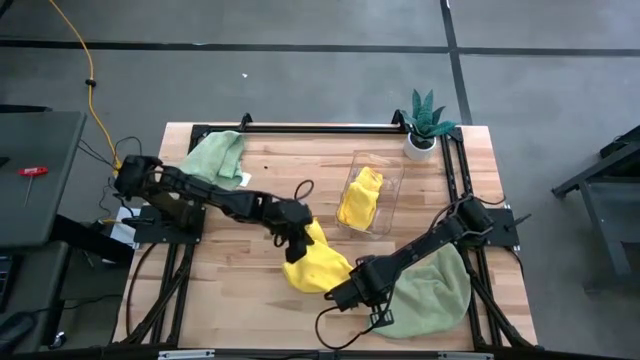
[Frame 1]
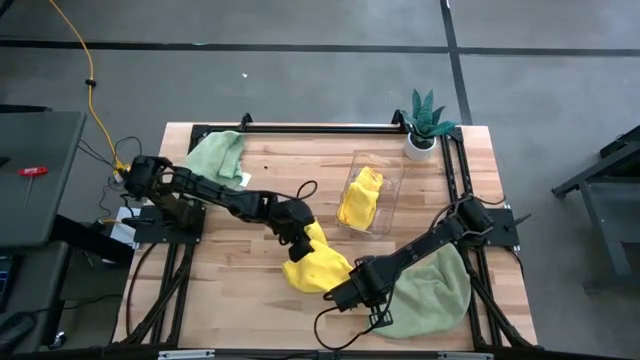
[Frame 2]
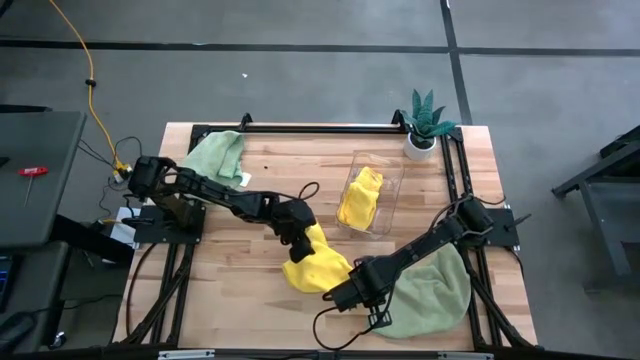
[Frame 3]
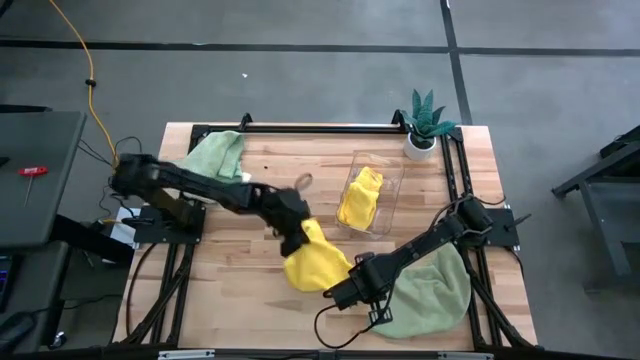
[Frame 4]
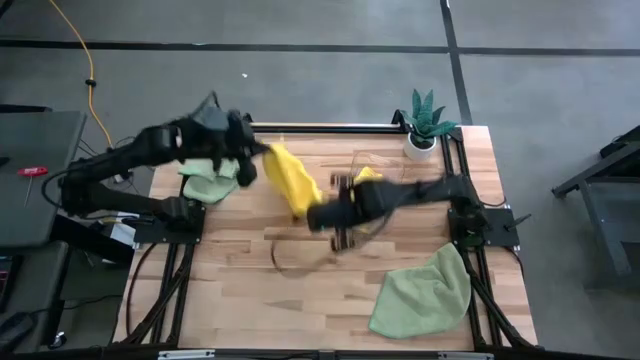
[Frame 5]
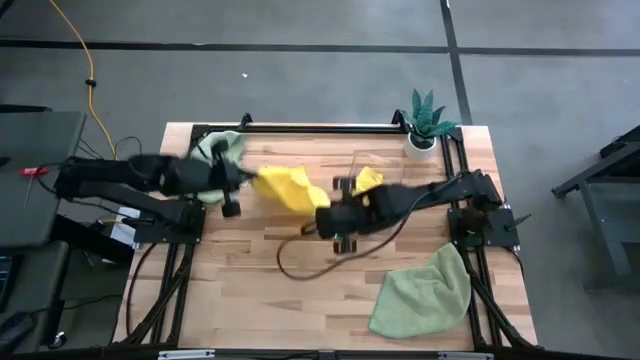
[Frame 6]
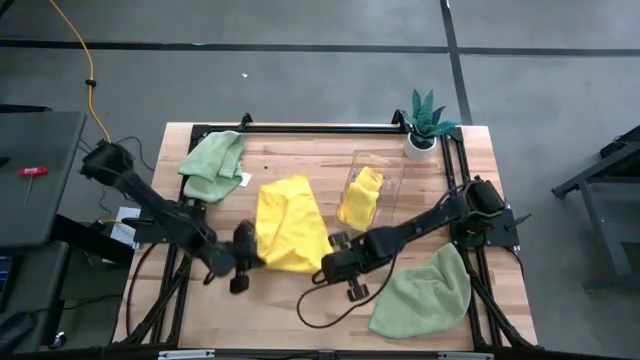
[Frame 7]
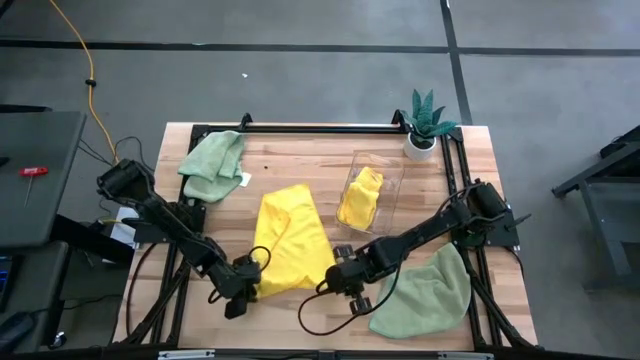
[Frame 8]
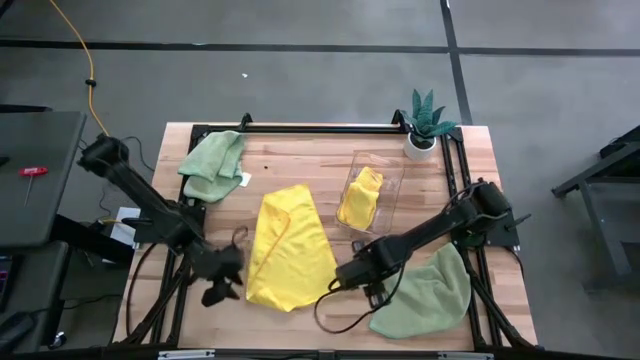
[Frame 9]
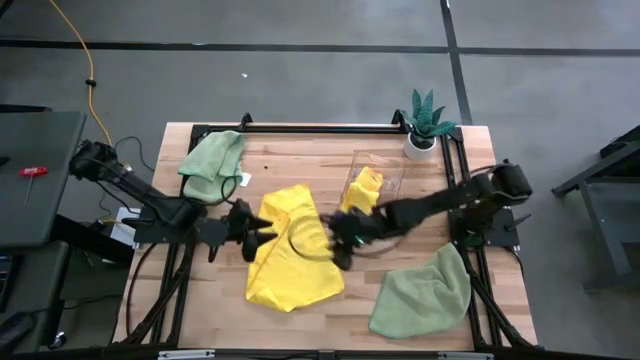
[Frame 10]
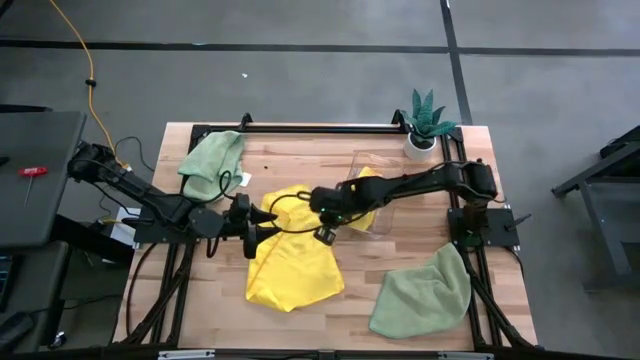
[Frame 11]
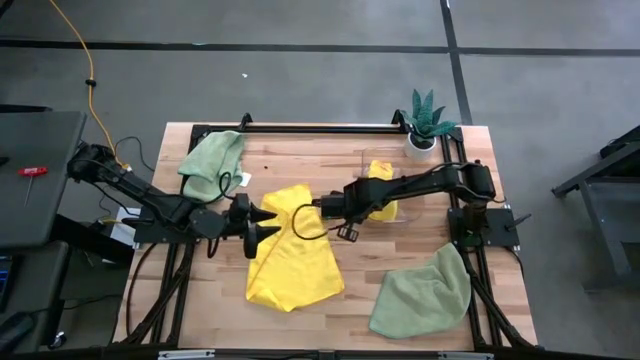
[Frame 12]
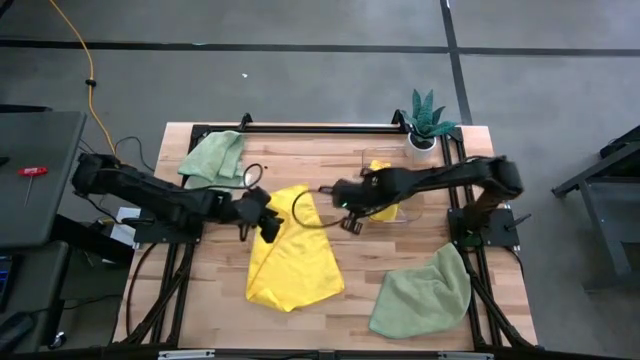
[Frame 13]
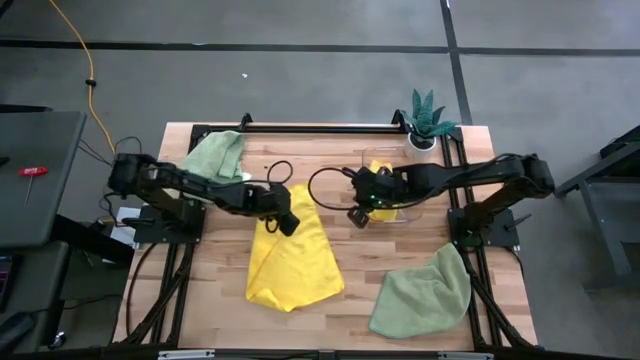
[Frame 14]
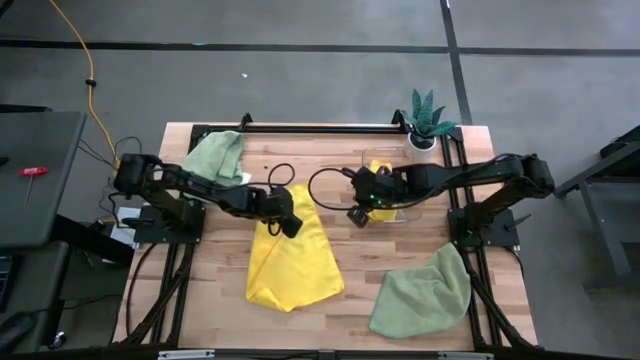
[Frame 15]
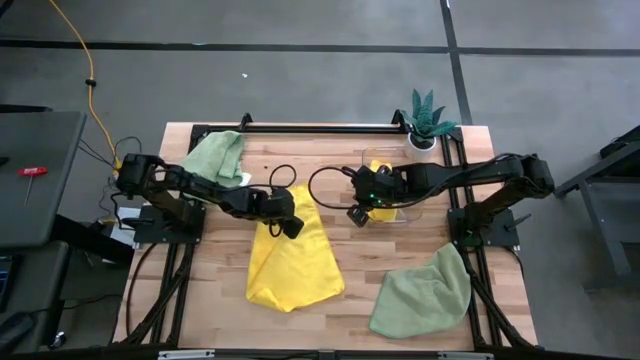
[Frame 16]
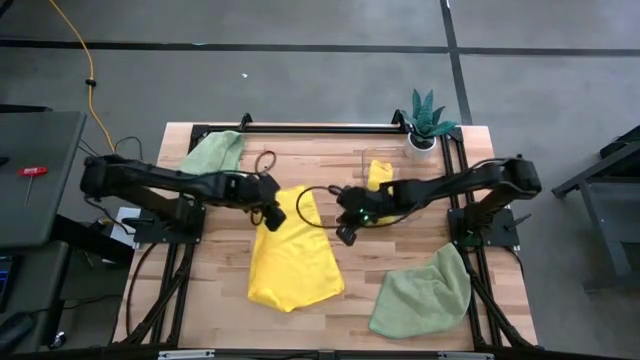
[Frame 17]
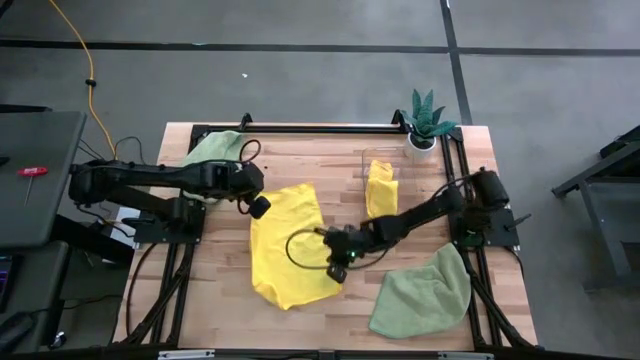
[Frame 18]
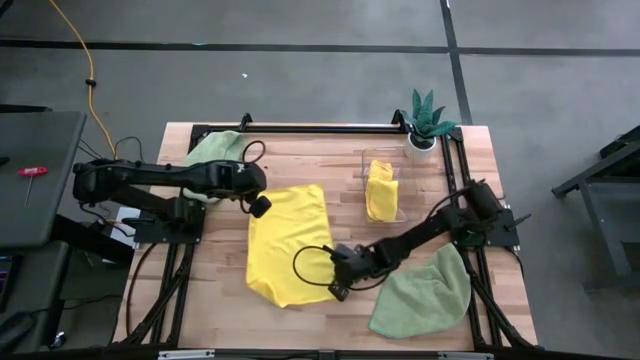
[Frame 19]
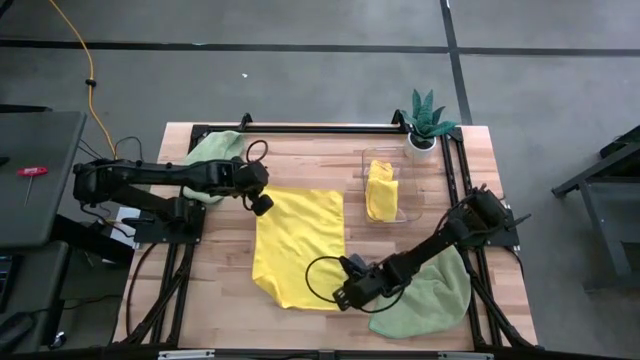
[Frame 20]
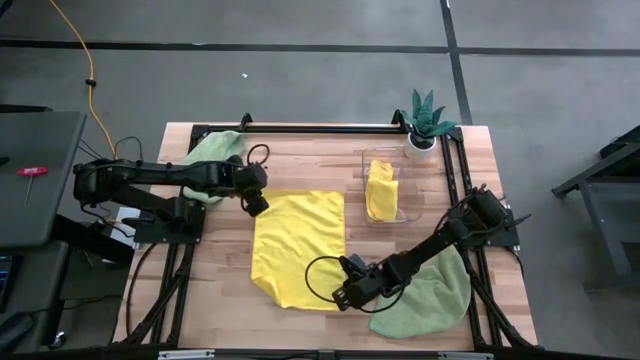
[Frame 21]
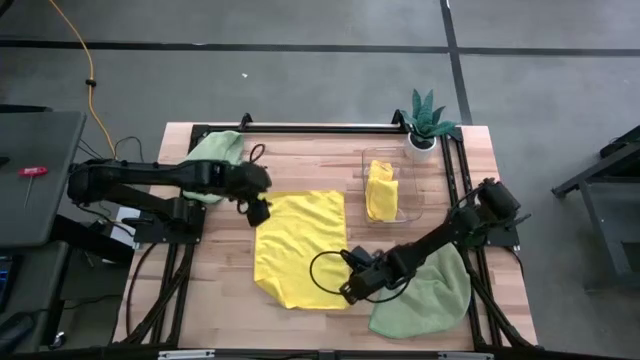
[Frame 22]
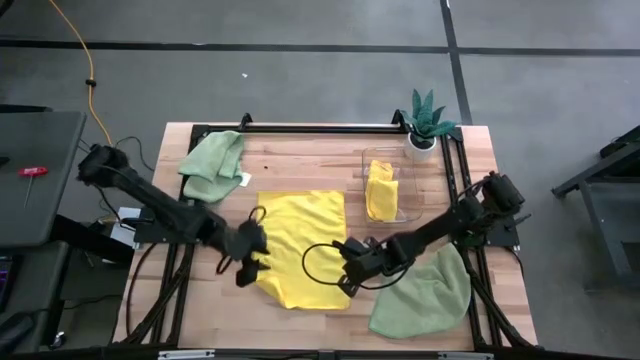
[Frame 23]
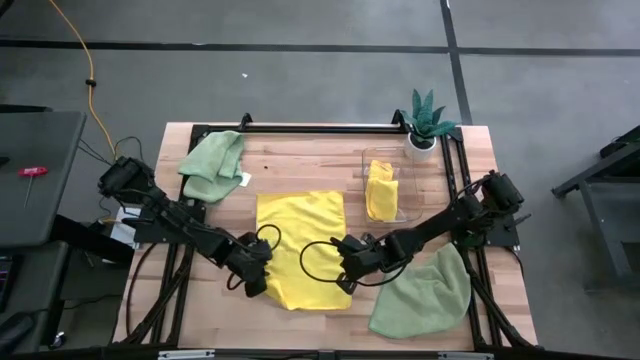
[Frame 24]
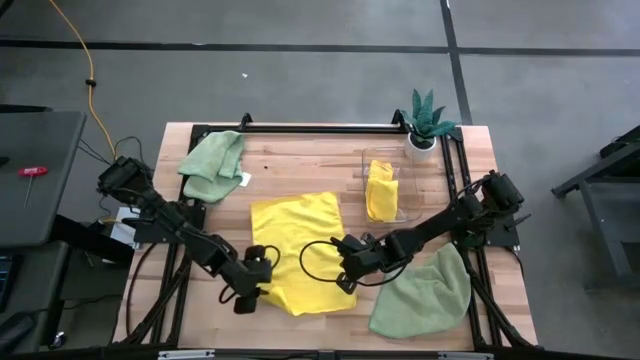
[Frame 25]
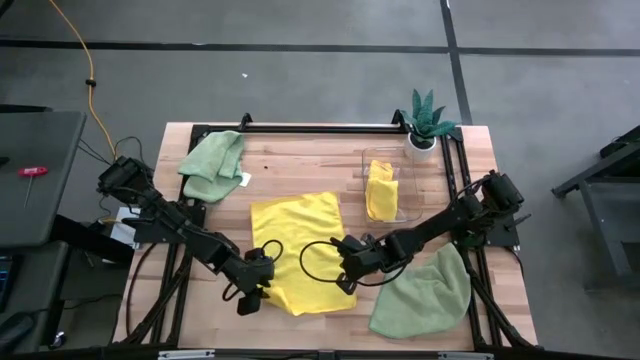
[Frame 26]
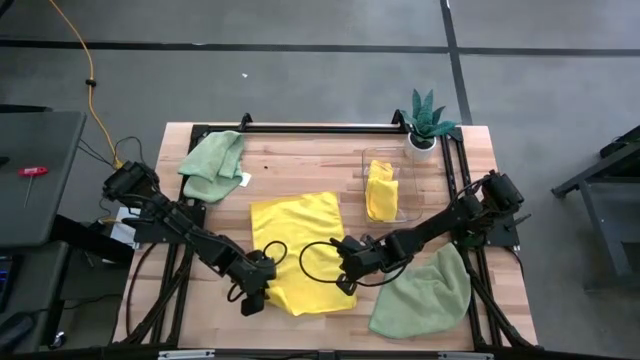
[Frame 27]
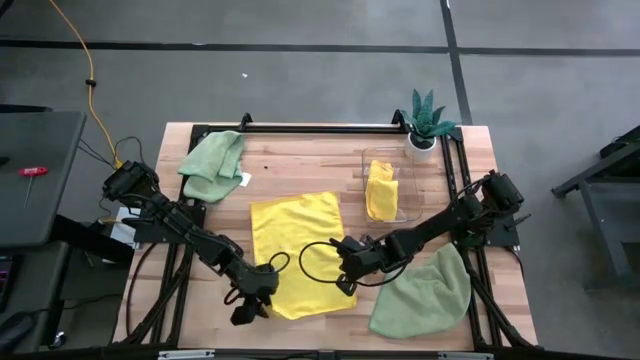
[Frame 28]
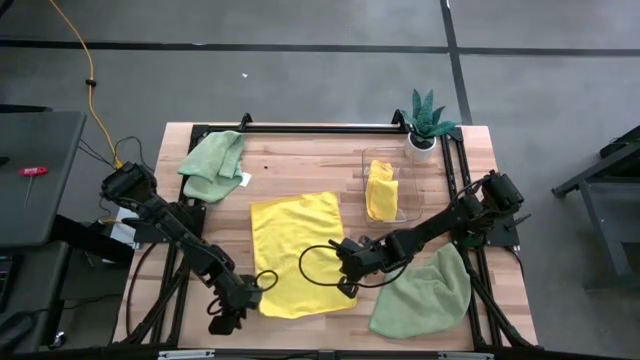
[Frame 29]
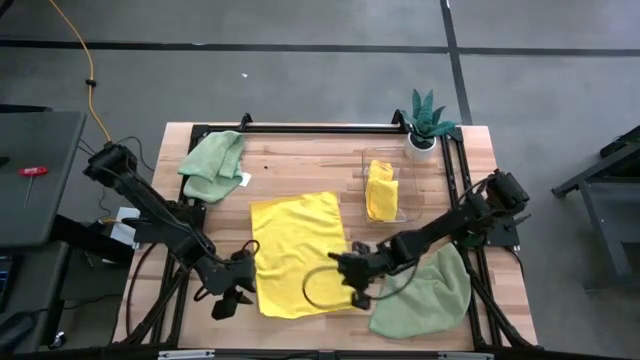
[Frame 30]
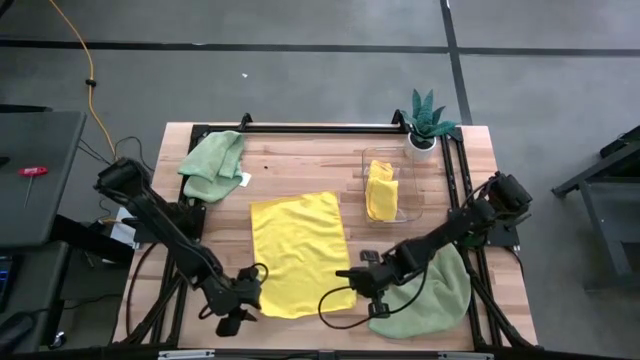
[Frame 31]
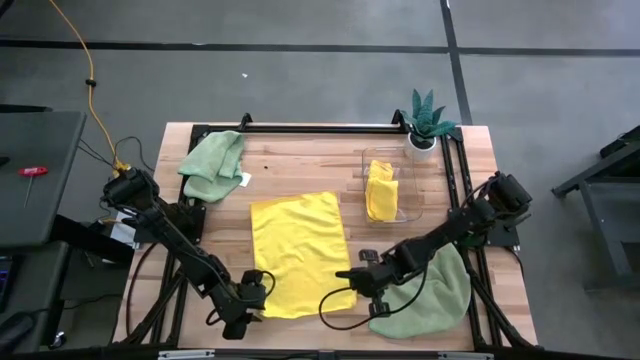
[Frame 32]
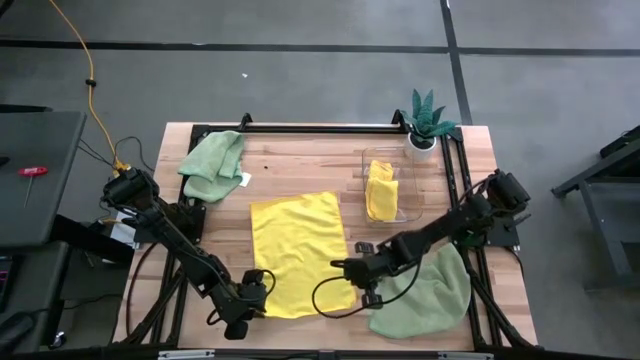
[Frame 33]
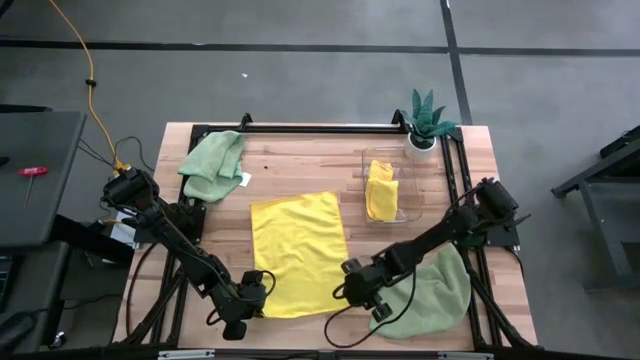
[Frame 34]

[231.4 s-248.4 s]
Task: Fold microfiber towels
Fold the yellow microfiber towel

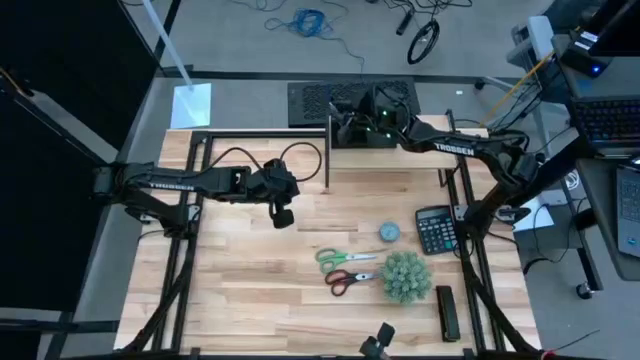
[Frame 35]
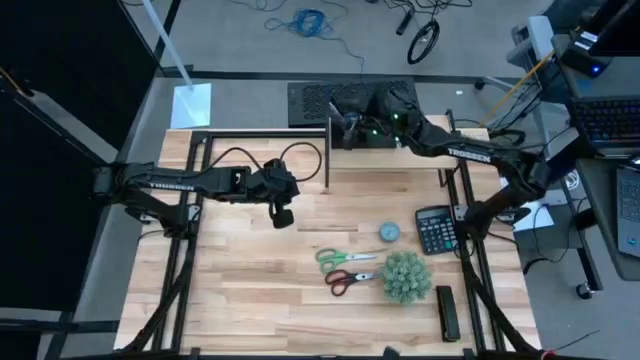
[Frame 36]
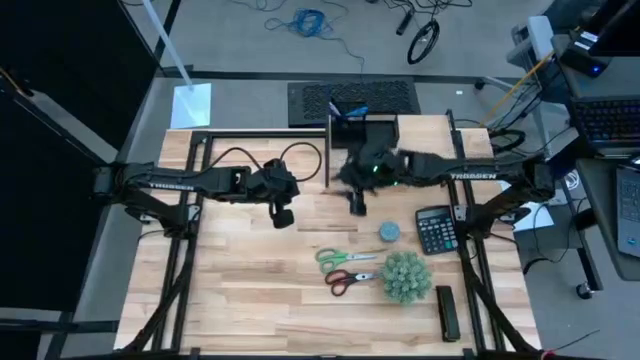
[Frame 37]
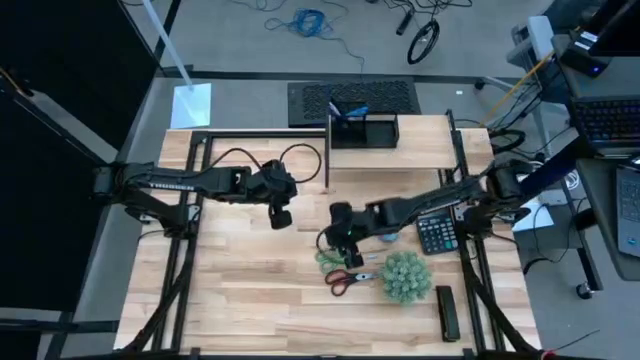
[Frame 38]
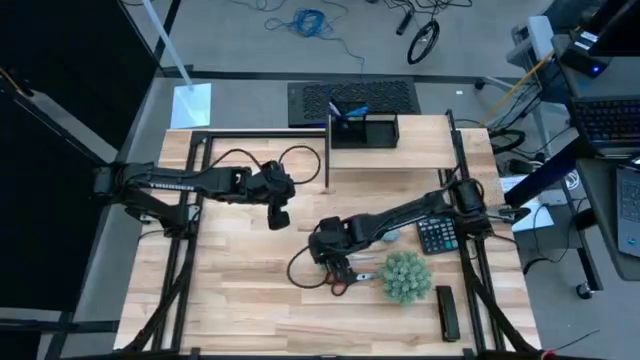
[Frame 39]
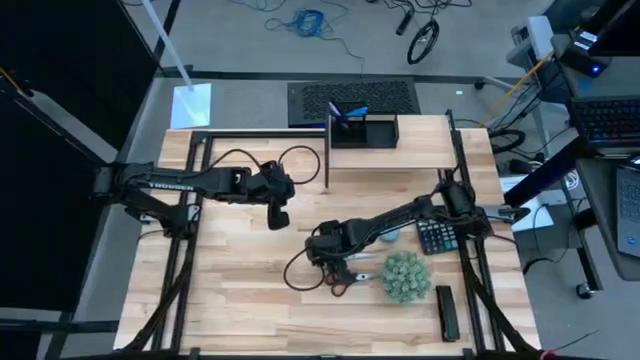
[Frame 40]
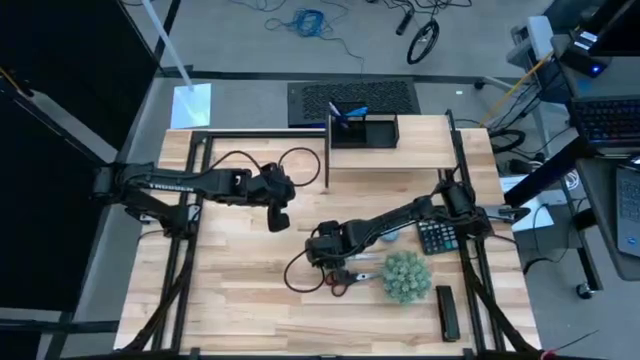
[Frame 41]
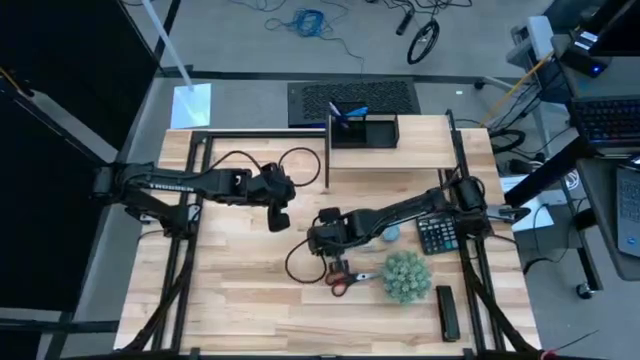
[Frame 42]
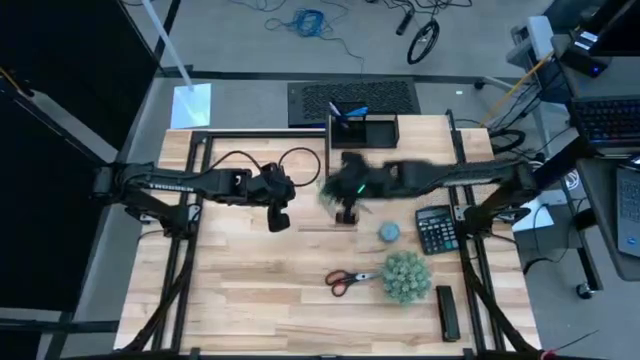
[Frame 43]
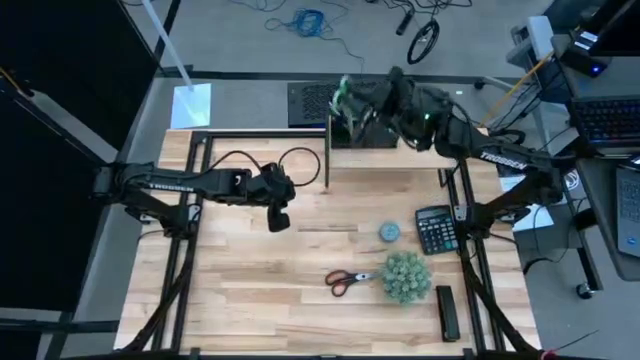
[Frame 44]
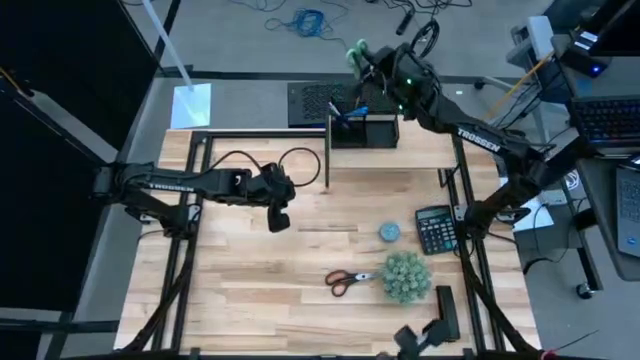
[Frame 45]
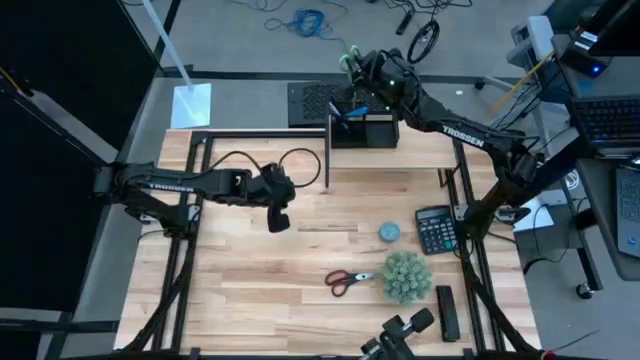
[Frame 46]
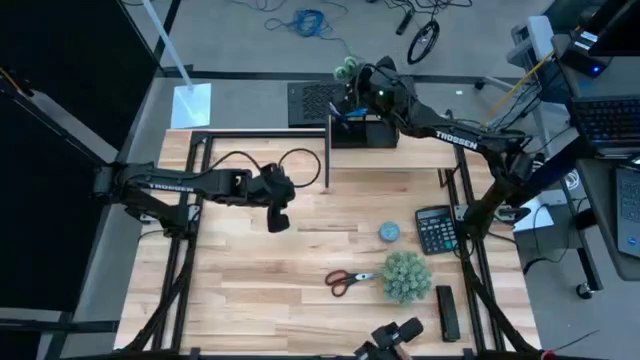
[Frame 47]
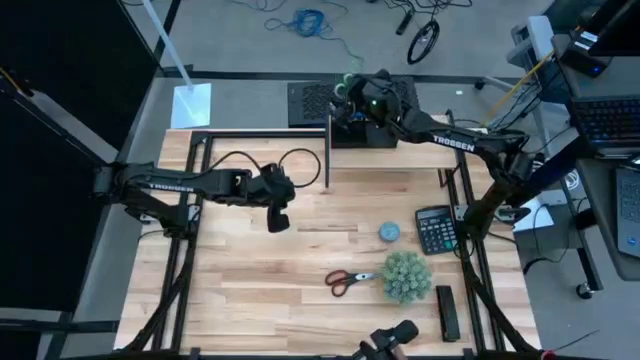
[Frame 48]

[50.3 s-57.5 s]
Task: Pick and place office supplies into organizer
Put the green scissors into the black desk organizer on the shelf
